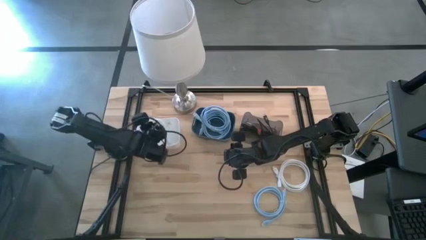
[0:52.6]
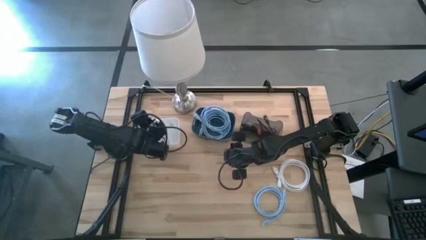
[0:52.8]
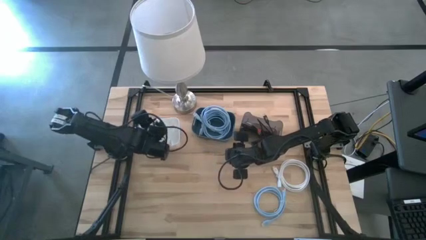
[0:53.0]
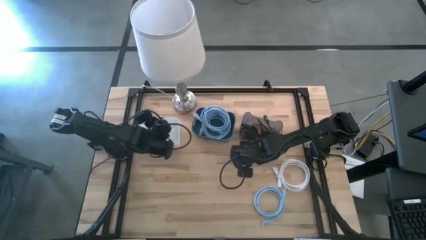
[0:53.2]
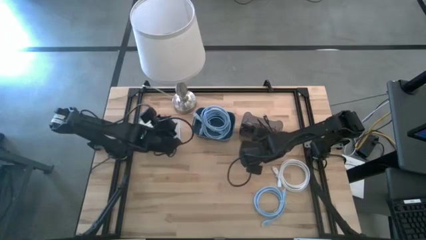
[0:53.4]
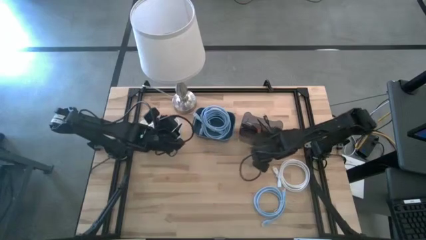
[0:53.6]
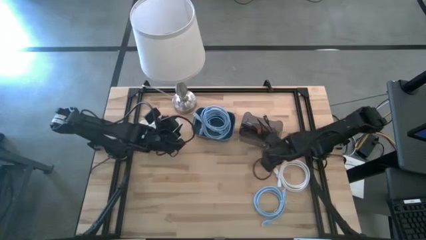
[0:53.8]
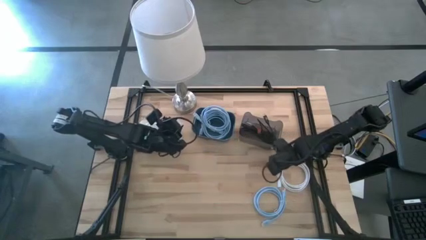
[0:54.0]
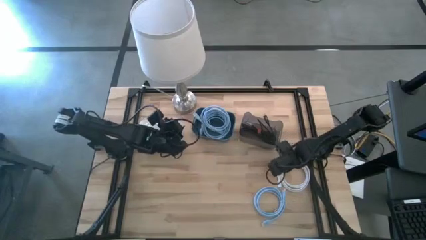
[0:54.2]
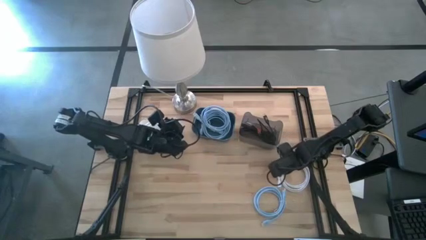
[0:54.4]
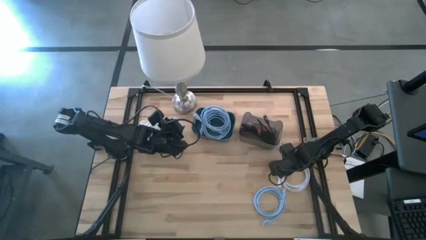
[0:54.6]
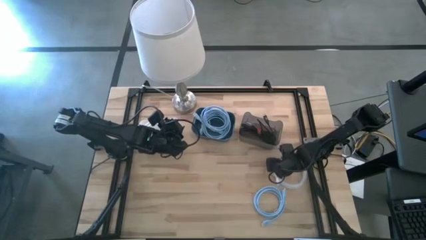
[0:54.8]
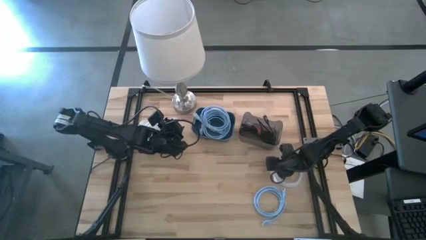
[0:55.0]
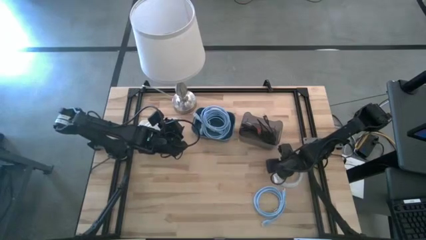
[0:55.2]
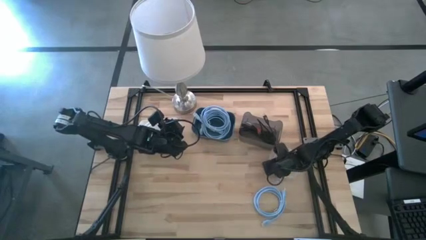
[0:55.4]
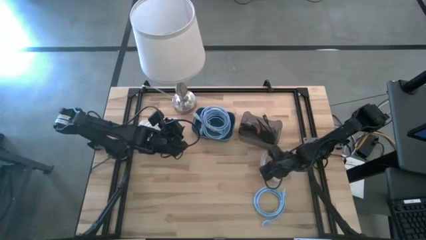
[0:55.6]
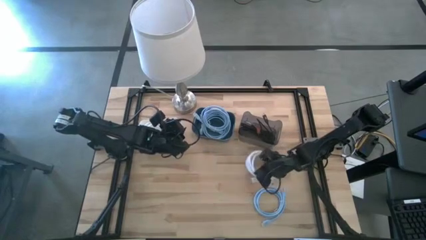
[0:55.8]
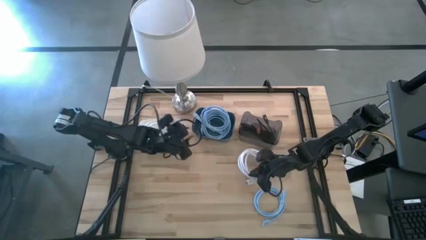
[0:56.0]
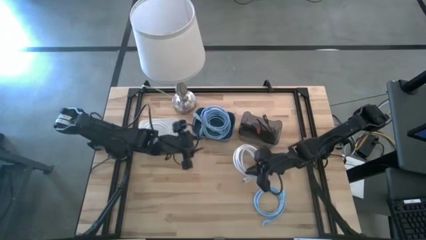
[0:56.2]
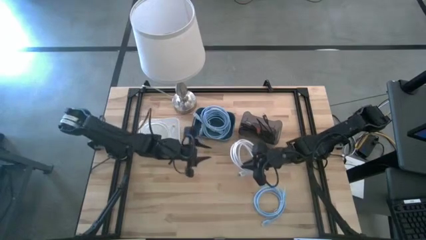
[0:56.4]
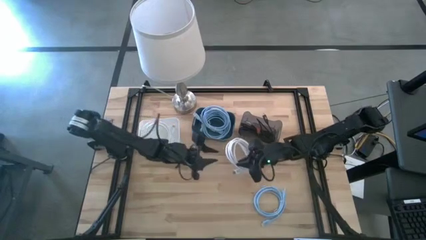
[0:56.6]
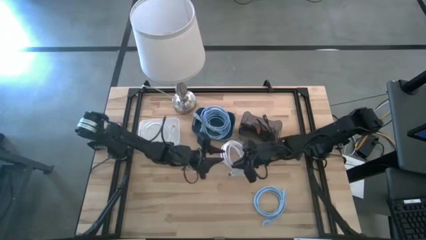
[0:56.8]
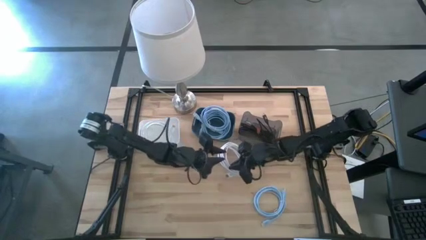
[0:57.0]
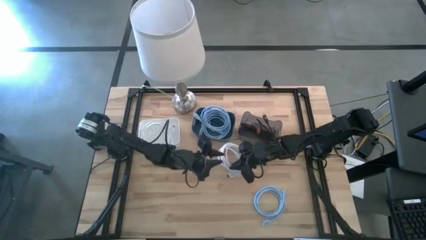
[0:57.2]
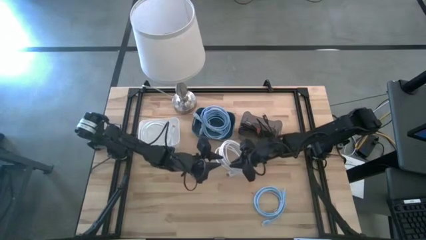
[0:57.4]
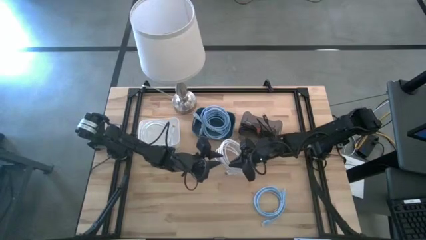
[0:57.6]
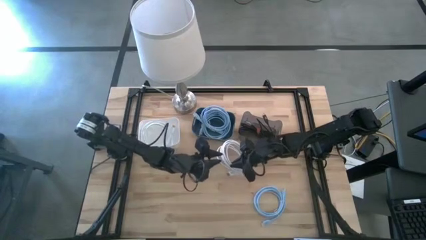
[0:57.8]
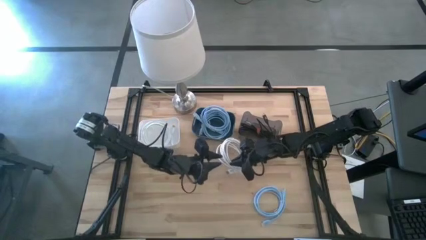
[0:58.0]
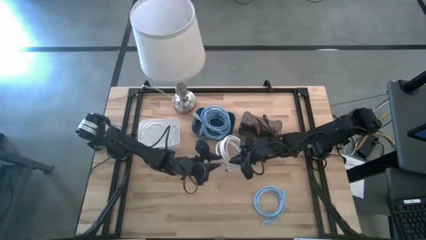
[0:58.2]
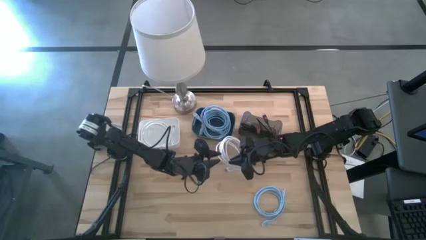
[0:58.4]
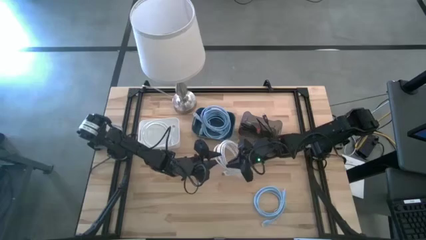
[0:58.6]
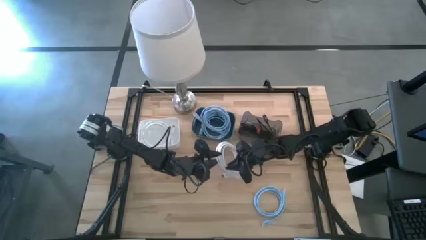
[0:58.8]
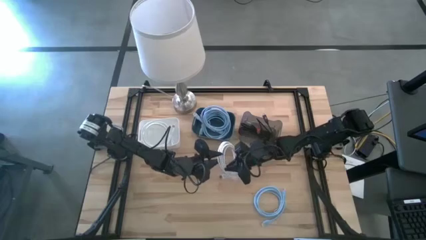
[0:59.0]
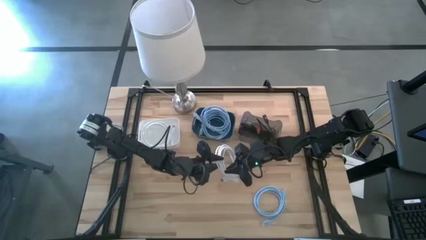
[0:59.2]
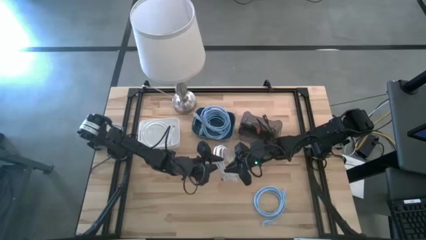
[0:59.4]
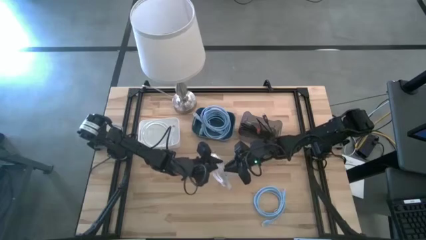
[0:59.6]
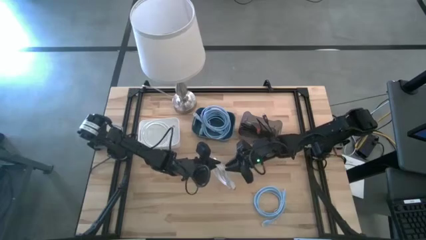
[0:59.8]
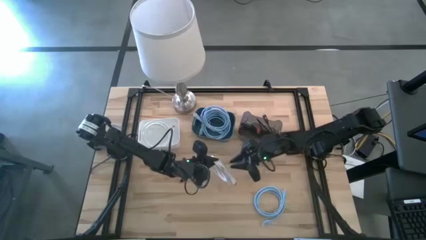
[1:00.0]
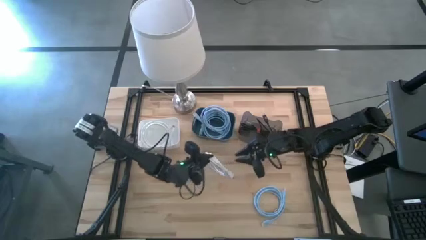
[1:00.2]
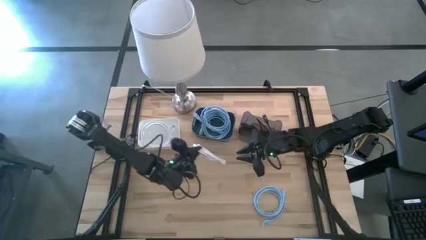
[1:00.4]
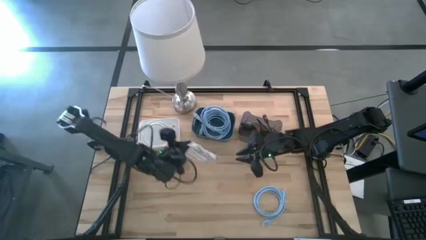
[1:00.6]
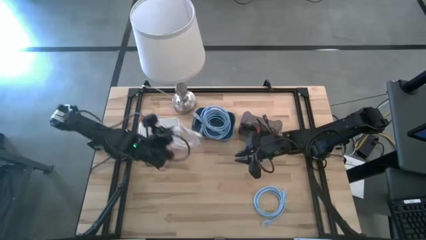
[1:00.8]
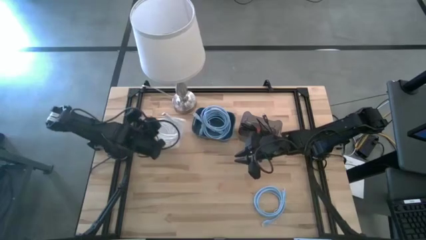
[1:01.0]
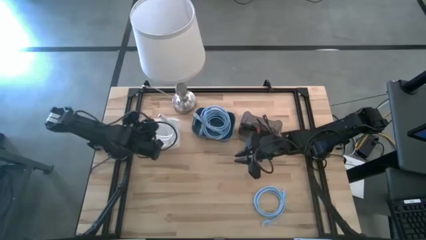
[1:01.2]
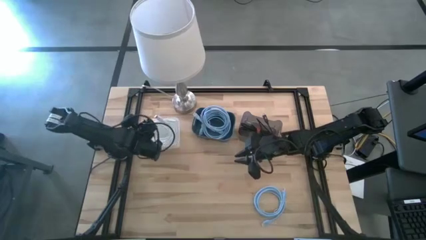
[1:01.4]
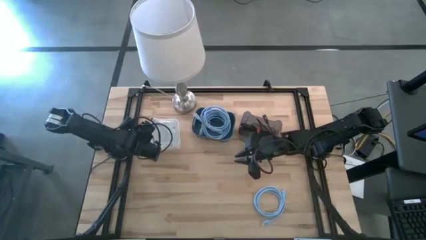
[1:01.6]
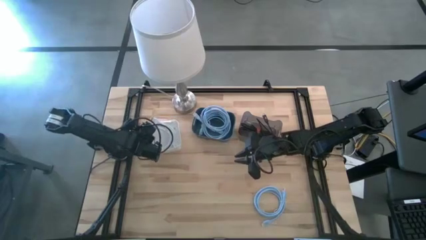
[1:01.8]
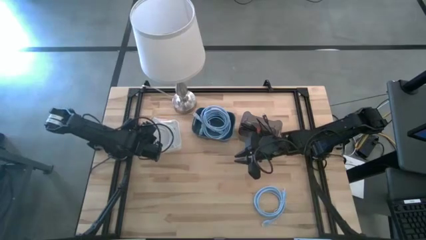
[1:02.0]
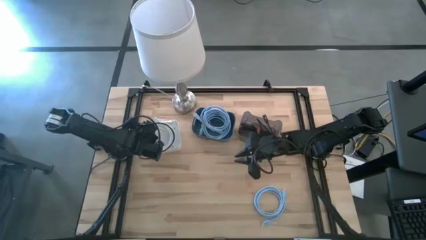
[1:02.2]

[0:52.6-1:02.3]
Task: Pick & Place USB Port
Put the white charger cable into the white bin

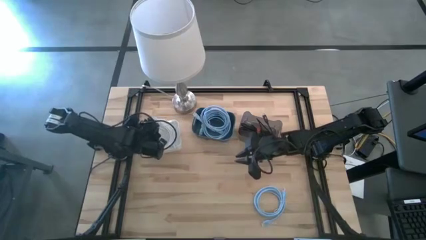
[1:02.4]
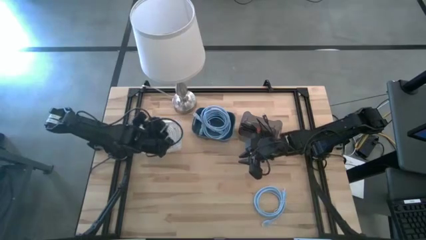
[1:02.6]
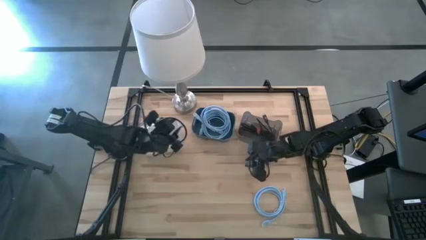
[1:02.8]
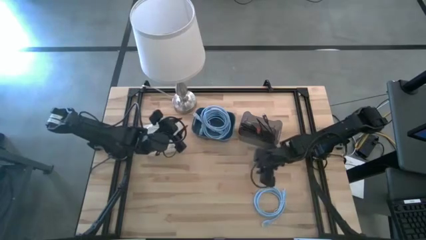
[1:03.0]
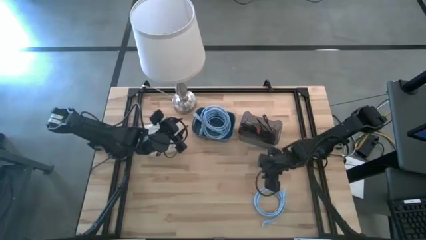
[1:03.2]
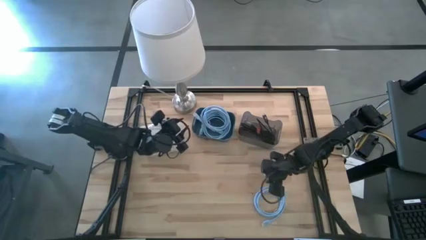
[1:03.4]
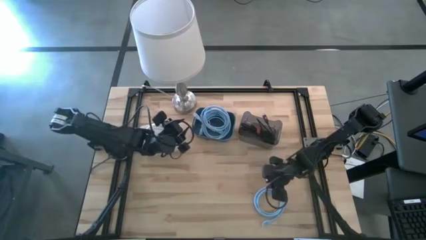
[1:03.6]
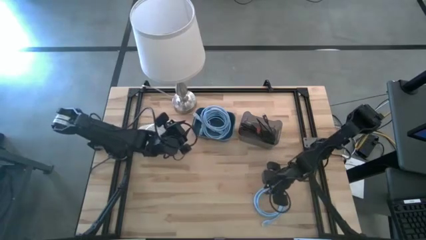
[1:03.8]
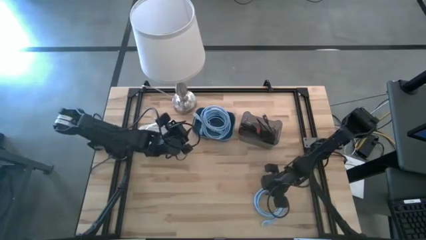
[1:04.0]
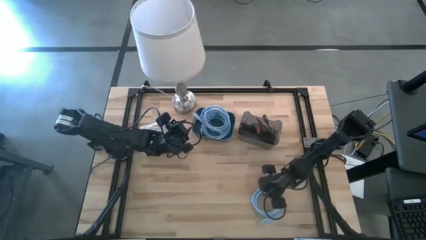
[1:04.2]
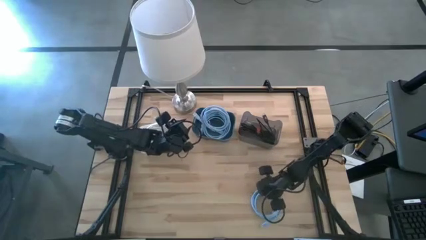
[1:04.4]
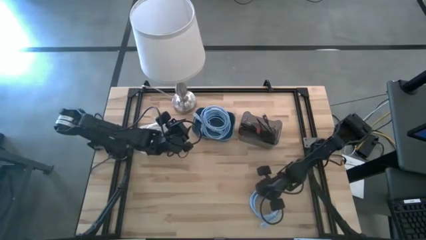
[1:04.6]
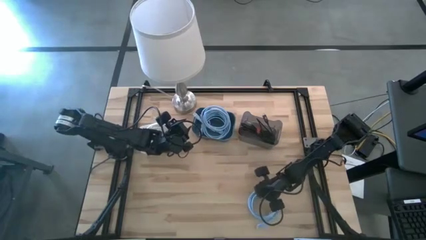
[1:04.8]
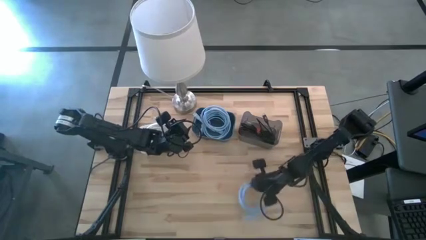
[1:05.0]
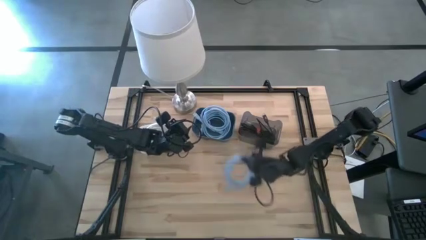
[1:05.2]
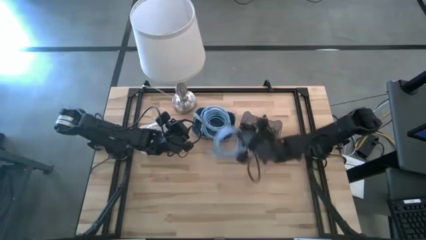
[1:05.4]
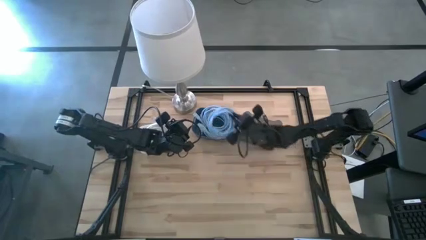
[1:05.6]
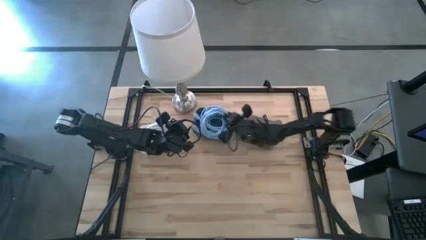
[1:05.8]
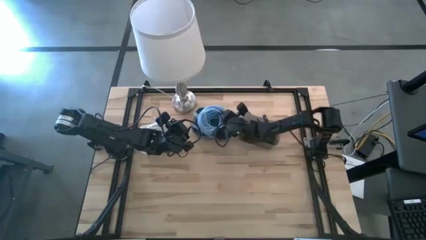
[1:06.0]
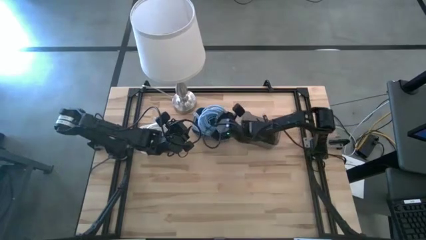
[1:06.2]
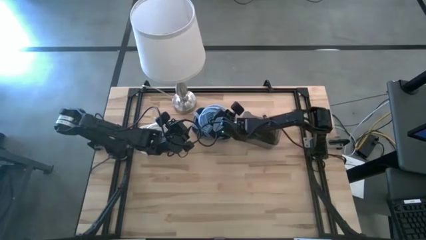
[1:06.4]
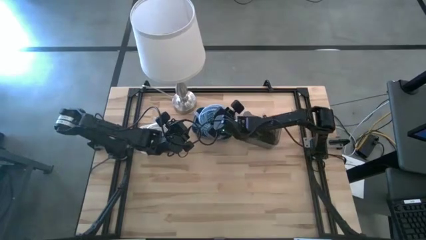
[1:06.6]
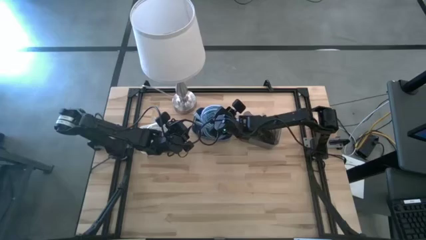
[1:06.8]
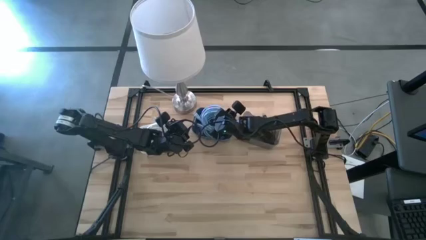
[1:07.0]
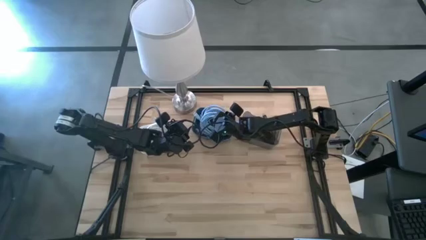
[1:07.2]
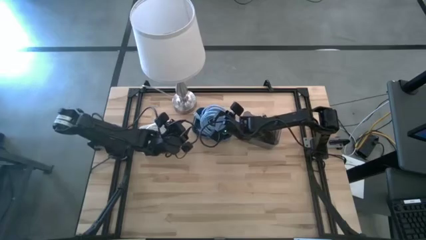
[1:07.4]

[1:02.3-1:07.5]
Put the blue charger cable into the blue bin

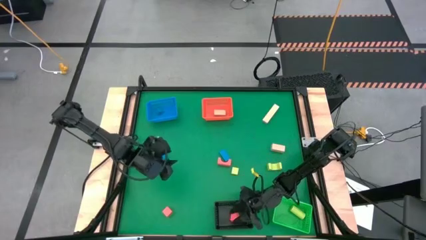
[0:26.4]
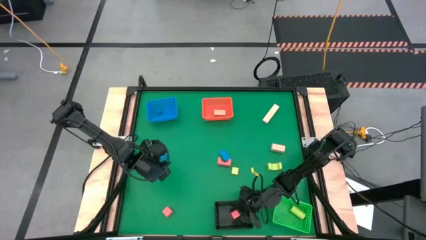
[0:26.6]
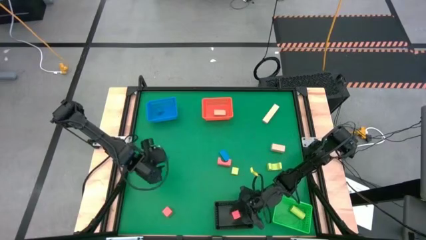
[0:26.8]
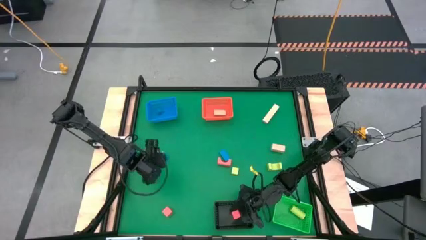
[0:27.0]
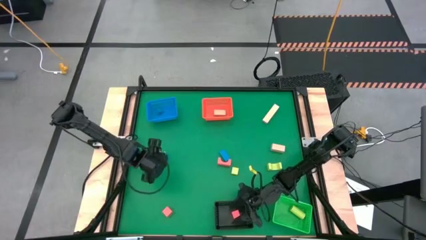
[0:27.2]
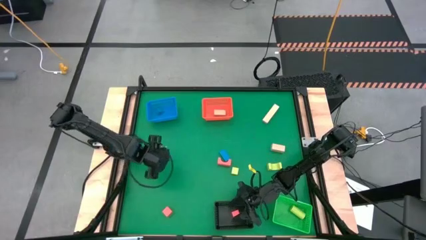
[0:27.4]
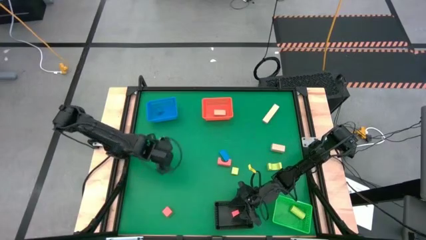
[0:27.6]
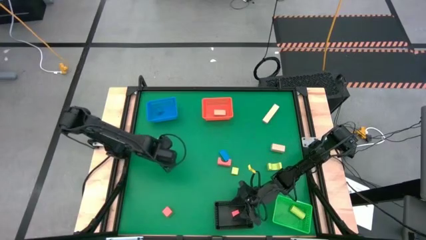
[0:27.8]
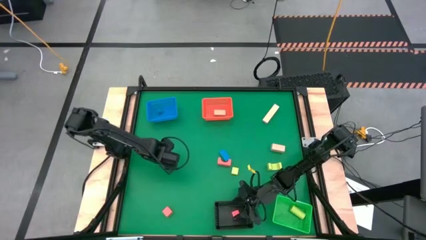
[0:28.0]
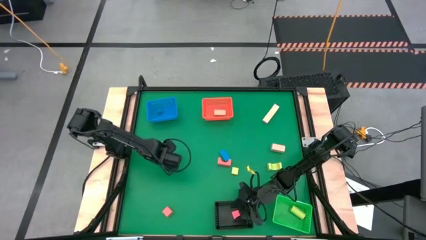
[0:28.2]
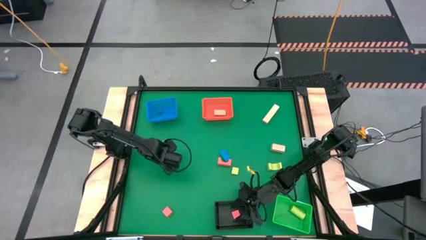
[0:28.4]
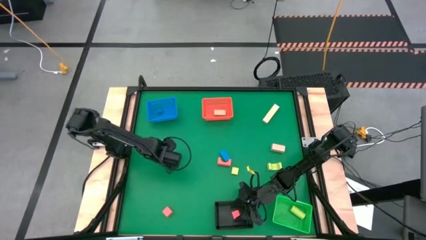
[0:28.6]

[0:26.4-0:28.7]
Task: Sort & place blocks by color
Put the left blue block into the blue bin
